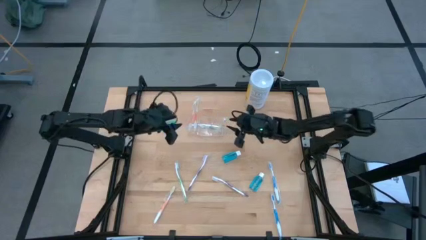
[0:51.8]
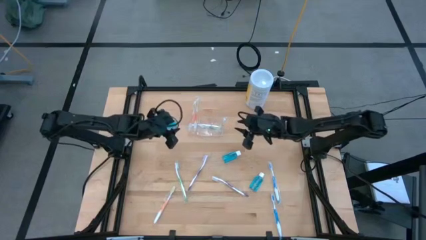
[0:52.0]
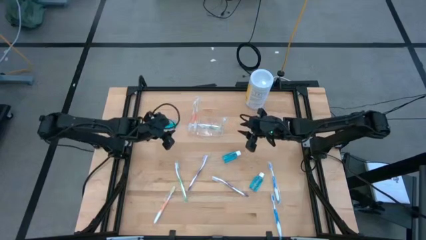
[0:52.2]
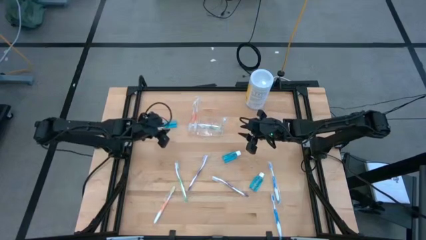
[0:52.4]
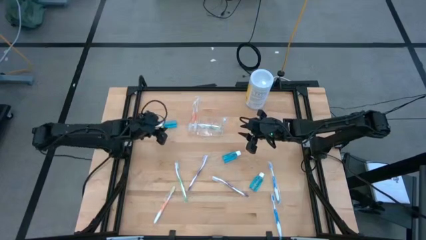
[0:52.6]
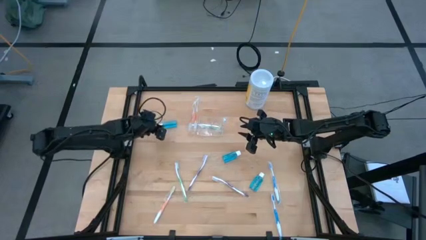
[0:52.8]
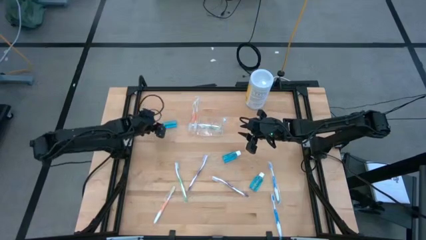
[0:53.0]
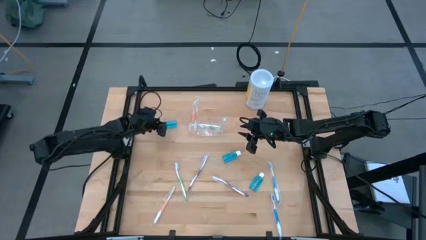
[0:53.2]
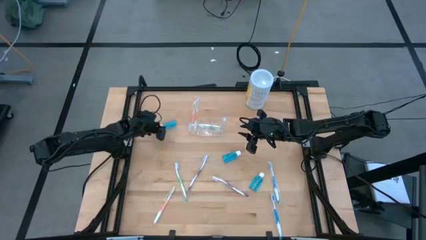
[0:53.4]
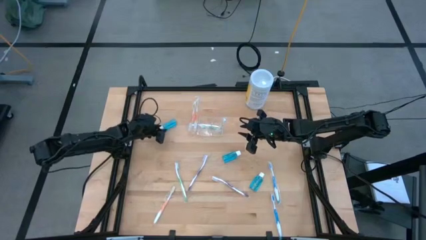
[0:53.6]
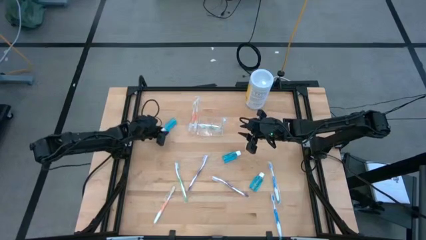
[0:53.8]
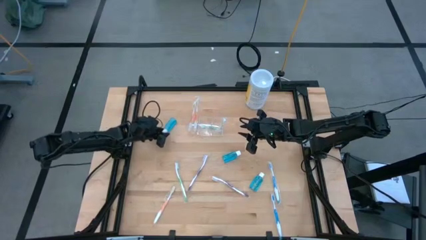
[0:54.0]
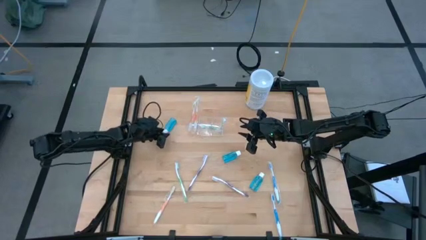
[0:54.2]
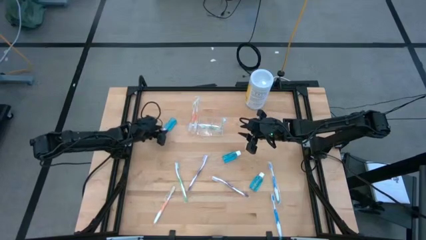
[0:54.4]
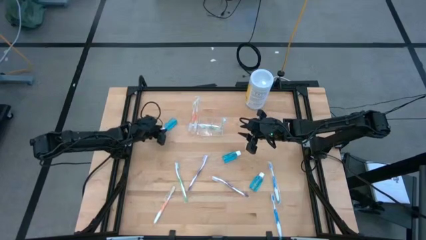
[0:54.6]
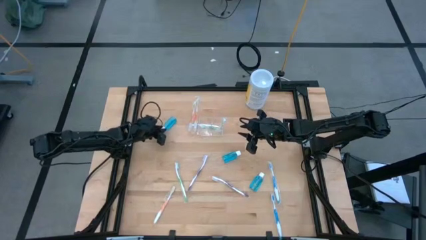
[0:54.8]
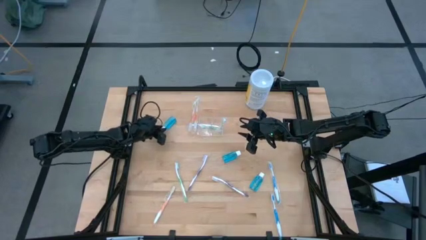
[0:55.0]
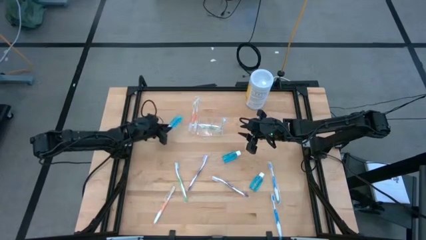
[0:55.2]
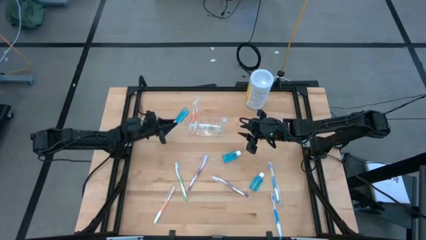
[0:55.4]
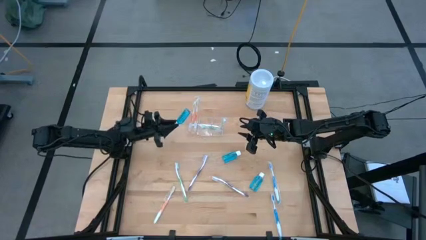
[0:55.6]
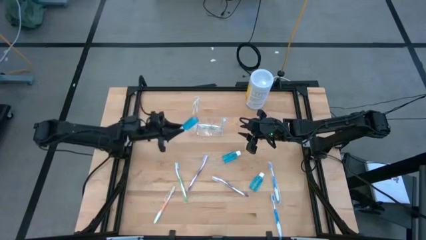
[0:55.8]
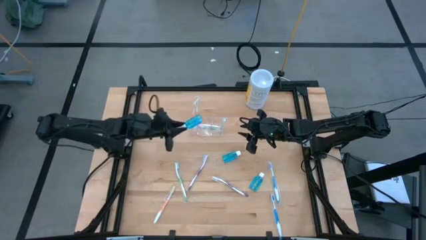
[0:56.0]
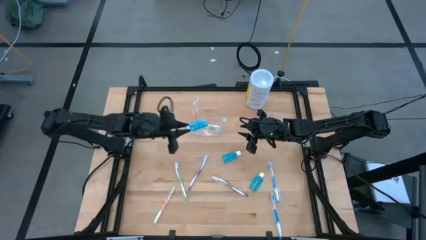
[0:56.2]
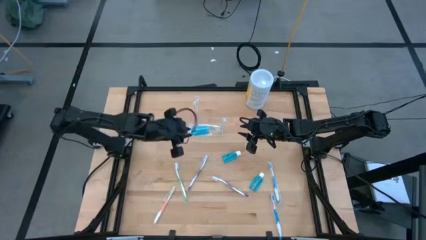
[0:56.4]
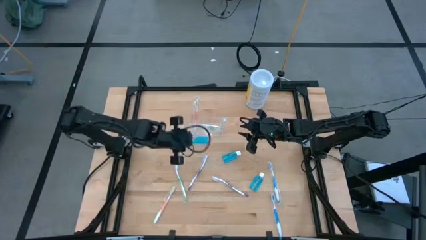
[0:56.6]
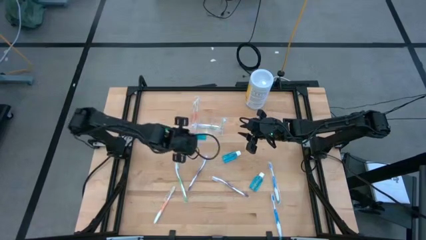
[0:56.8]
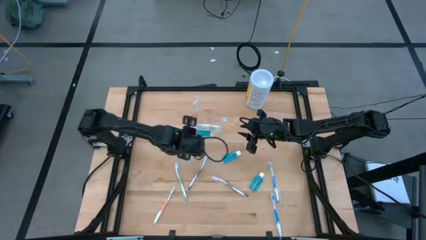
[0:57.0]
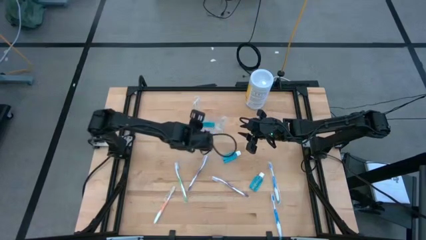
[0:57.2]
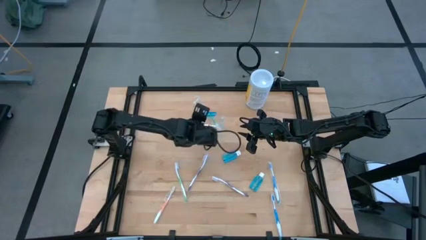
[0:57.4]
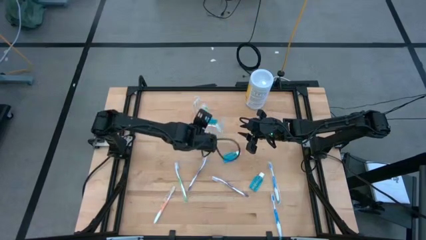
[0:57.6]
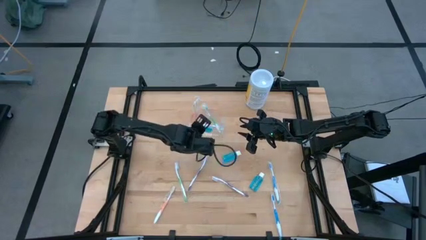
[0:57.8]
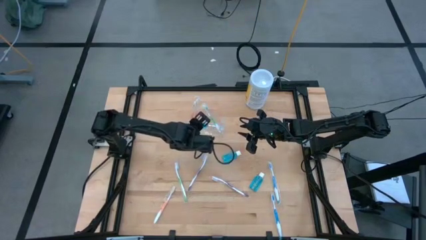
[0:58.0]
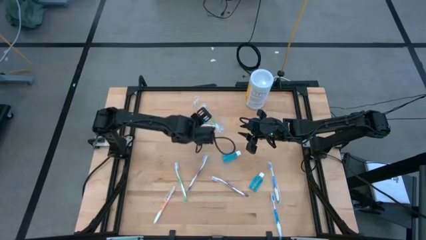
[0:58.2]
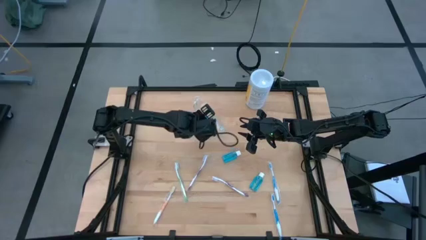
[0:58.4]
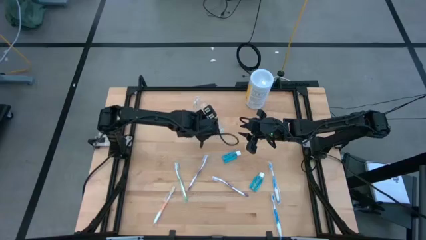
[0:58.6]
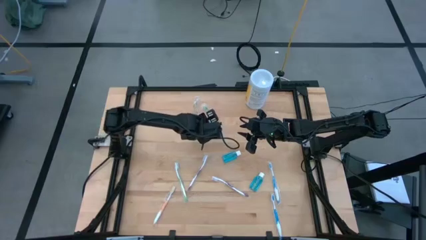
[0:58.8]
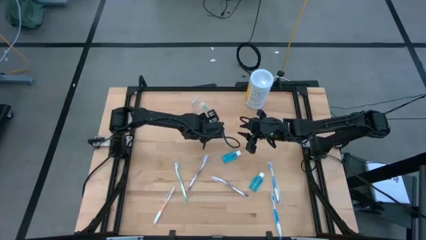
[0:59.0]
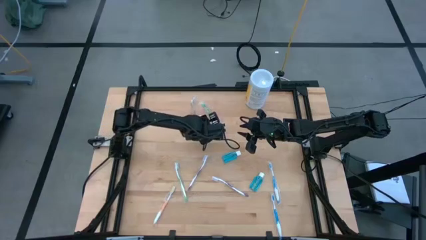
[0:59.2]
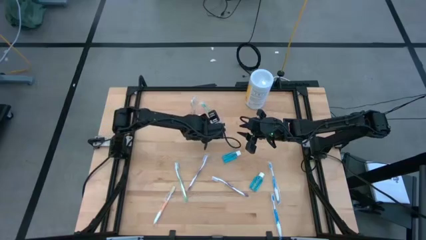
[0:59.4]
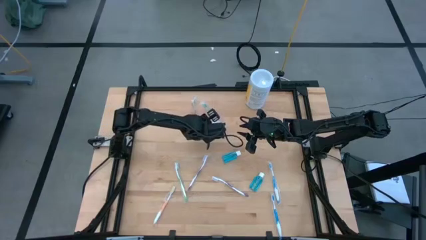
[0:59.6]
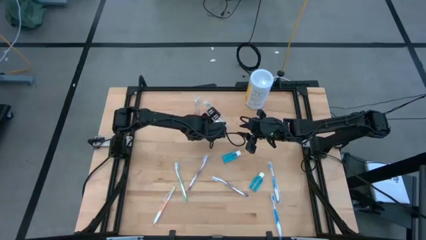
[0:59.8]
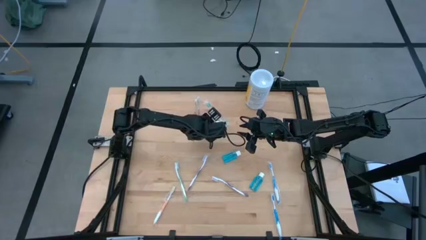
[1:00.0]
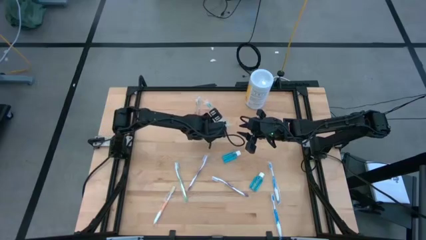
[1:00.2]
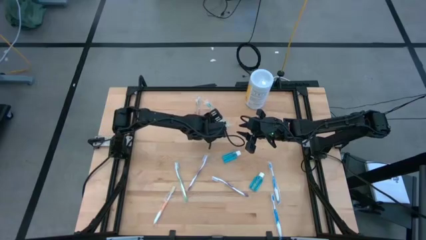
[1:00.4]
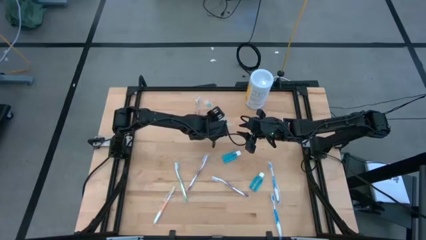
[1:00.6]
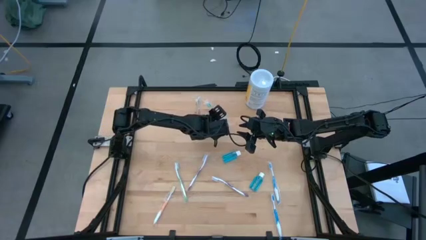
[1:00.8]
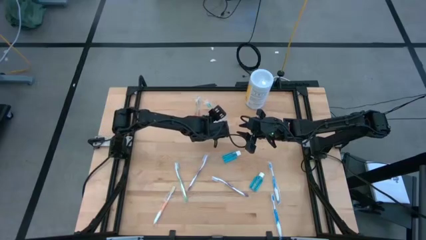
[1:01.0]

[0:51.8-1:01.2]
Task: Pick & Place toothbrushing station
Put the top left mouthwash into the transparent organizer

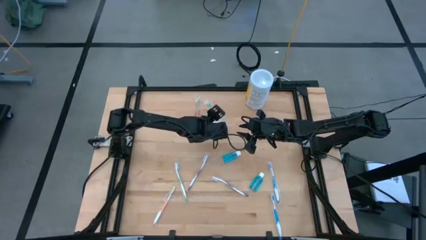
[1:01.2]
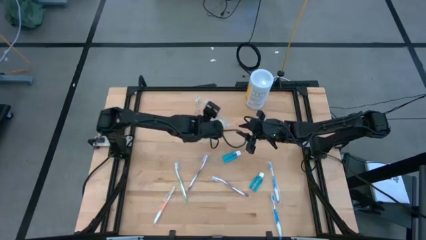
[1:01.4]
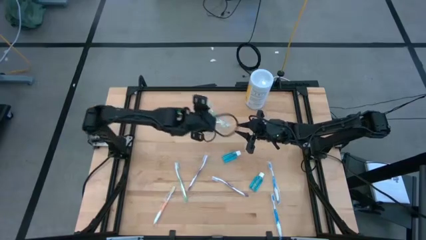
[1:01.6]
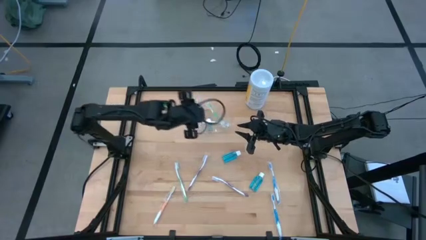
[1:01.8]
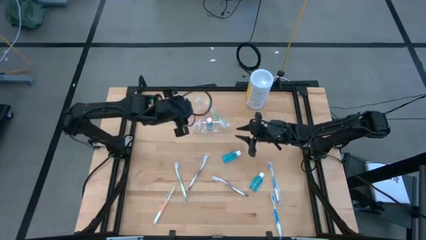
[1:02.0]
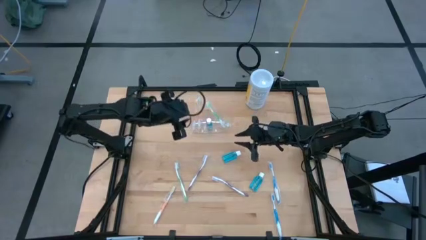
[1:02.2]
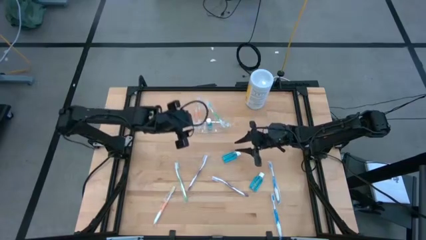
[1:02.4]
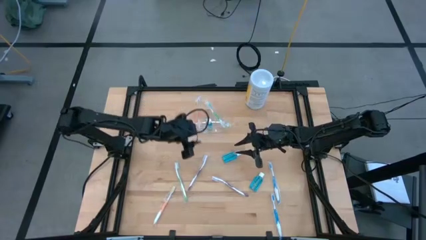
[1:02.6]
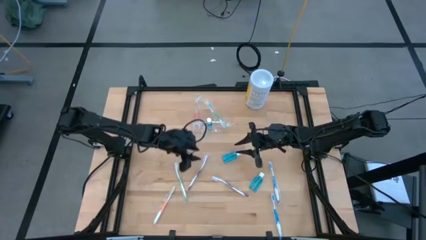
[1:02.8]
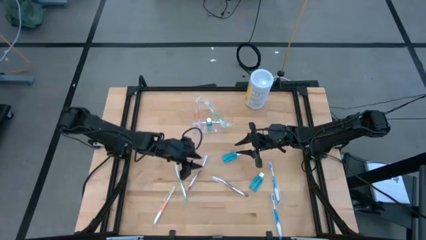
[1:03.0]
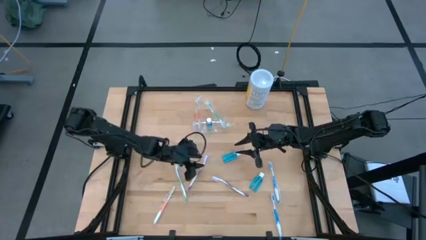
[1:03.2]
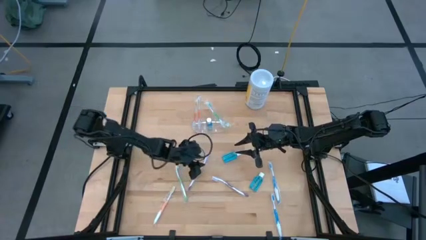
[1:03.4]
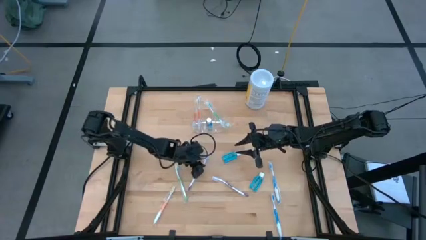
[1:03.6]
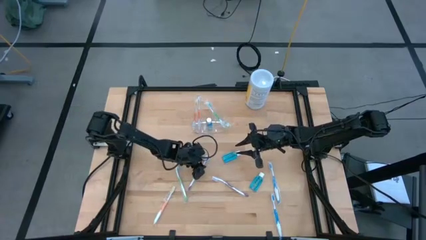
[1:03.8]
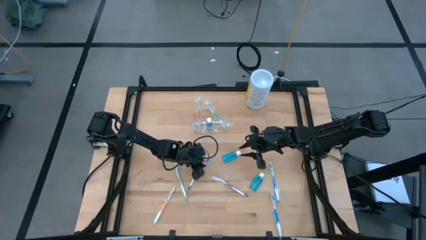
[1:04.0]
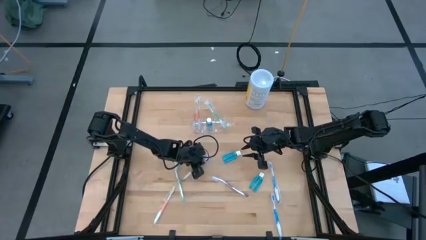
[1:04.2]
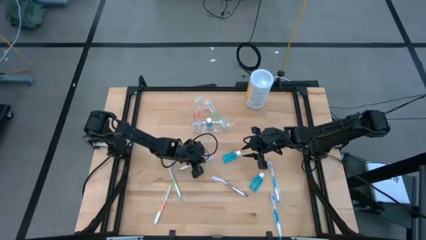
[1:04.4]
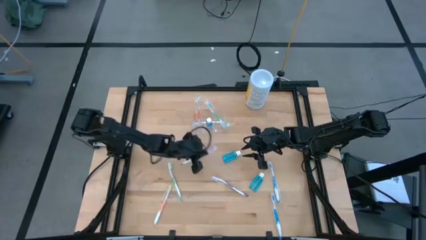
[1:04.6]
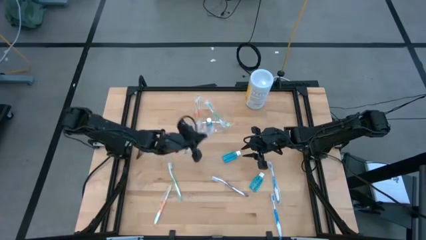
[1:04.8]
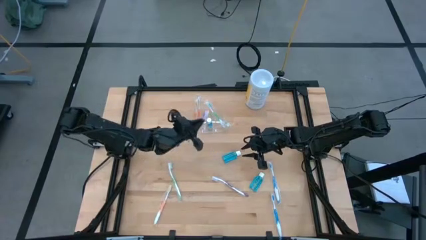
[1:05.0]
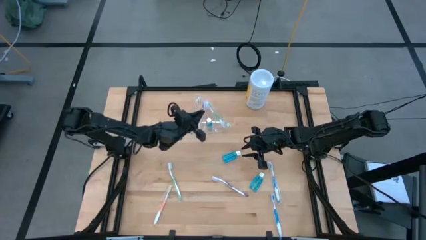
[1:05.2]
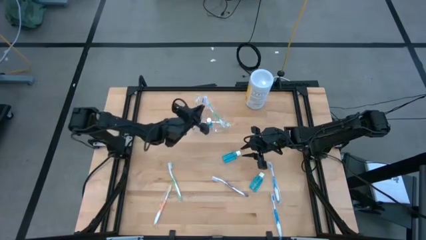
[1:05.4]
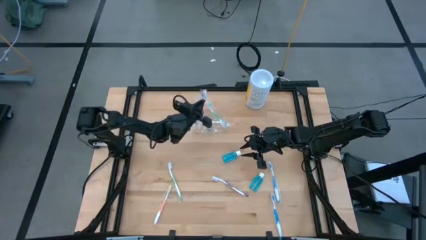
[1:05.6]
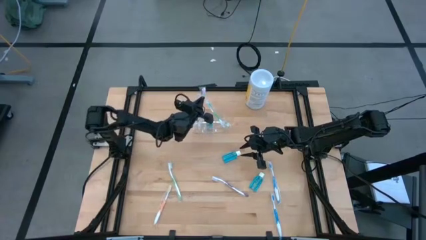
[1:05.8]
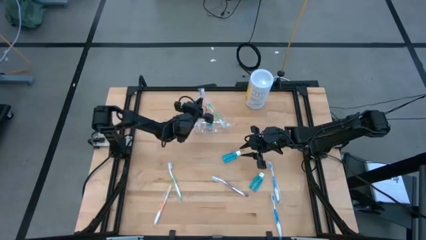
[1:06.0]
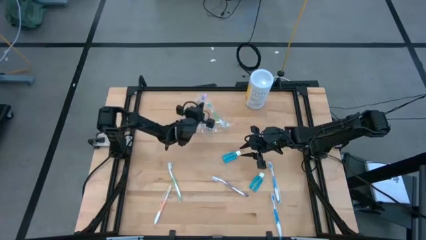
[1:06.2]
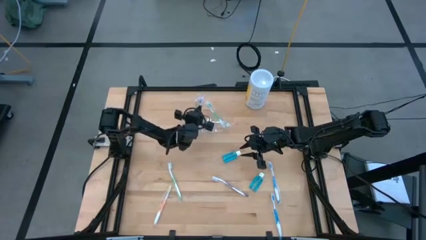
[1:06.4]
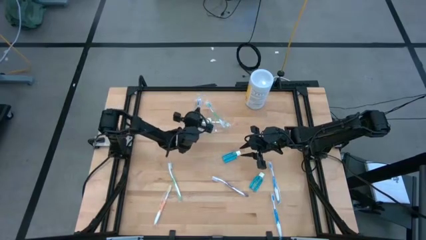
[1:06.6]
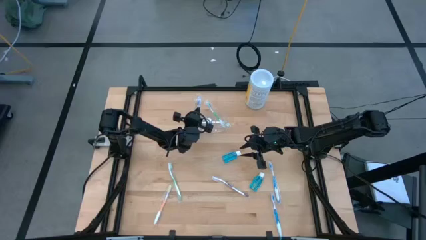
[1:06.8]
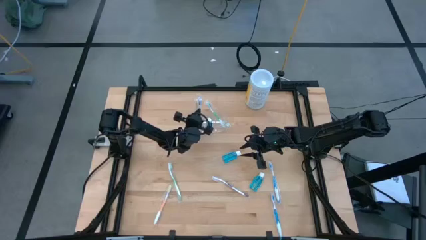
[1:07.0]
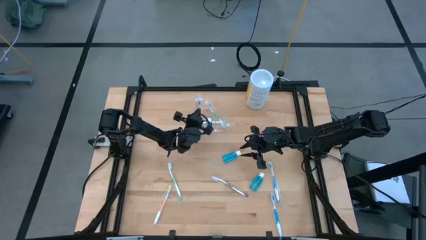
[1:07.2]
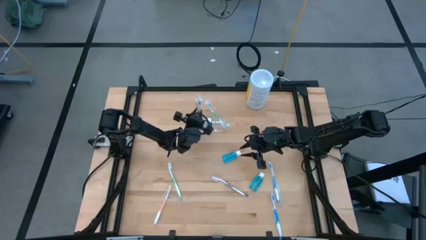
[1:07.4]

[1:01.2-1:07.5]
Put the left purple toothbrush into the transparent organizer
